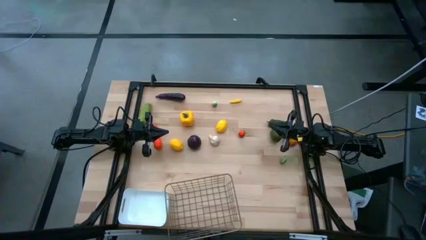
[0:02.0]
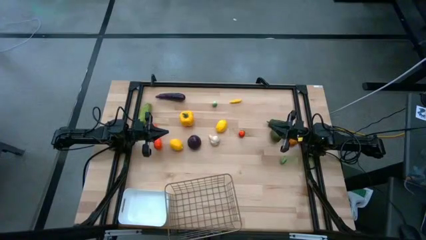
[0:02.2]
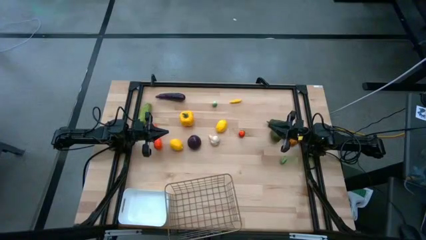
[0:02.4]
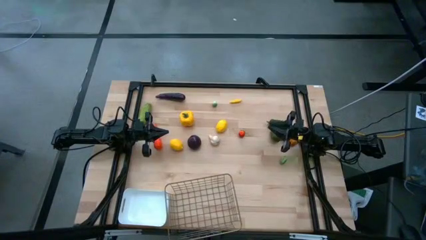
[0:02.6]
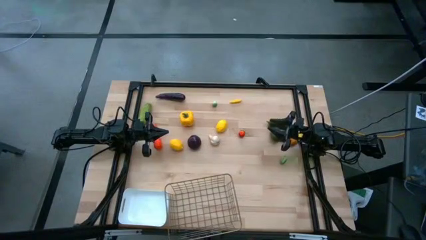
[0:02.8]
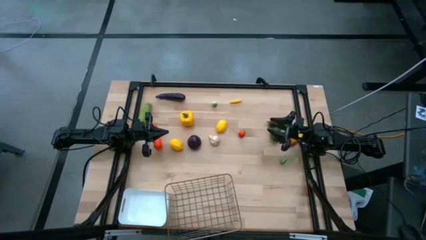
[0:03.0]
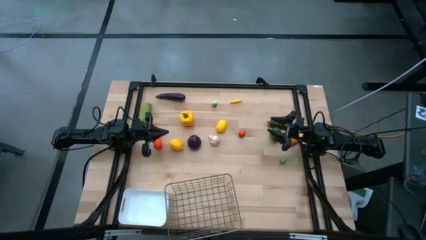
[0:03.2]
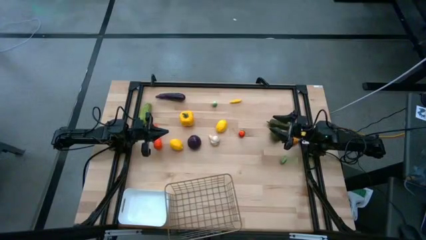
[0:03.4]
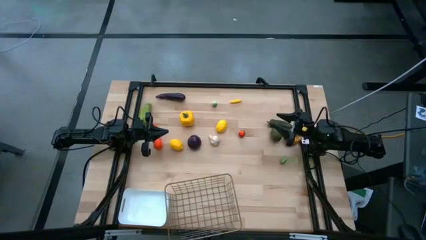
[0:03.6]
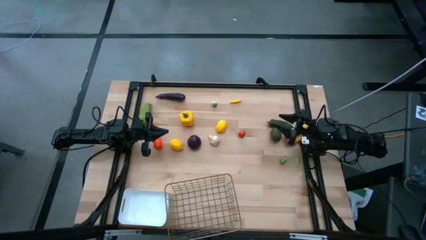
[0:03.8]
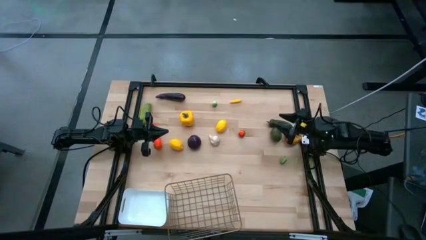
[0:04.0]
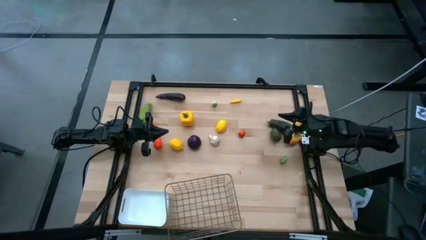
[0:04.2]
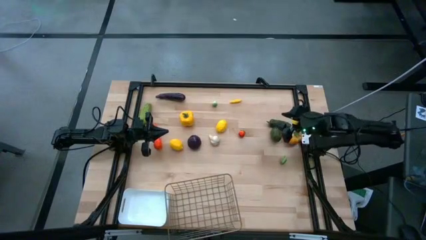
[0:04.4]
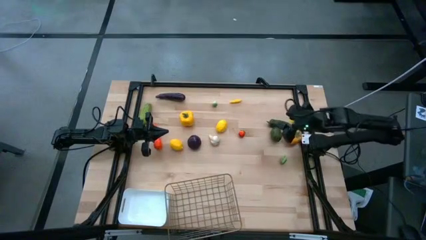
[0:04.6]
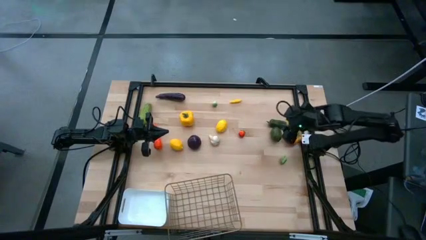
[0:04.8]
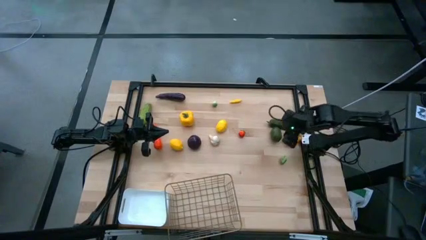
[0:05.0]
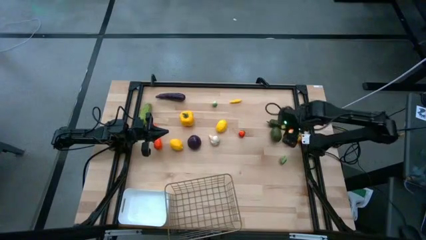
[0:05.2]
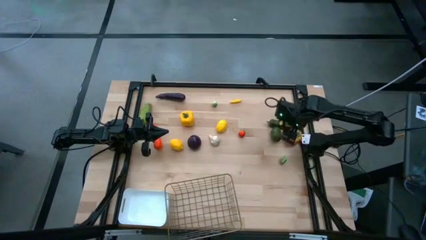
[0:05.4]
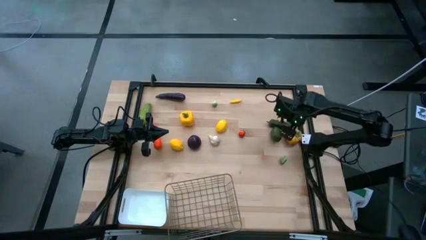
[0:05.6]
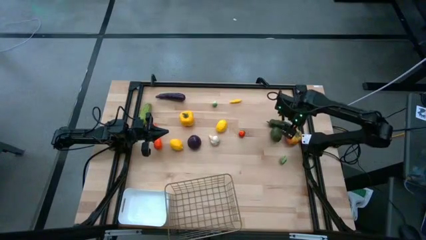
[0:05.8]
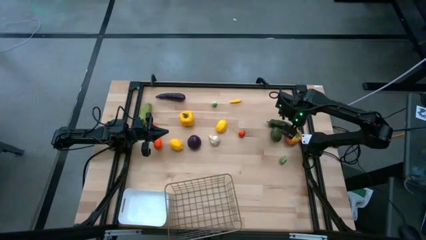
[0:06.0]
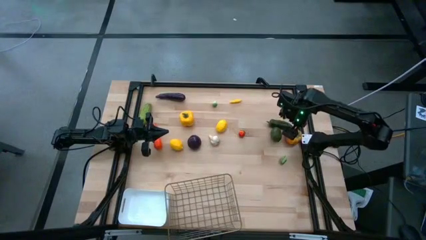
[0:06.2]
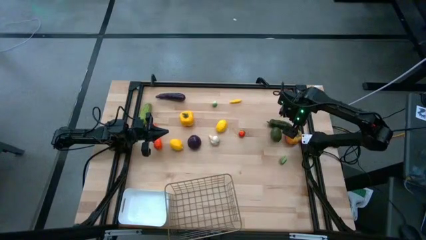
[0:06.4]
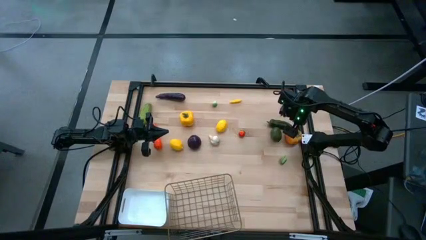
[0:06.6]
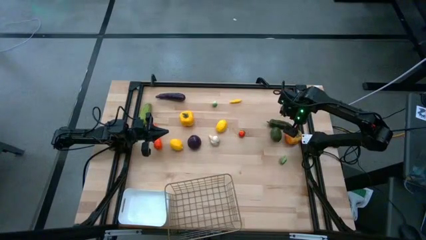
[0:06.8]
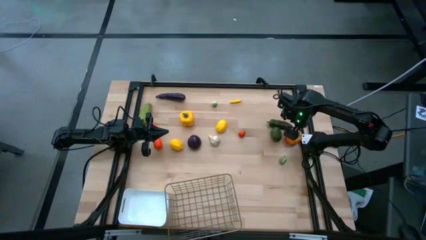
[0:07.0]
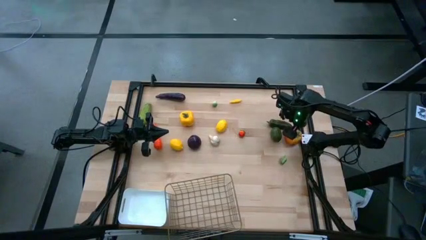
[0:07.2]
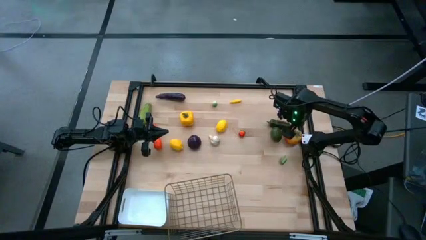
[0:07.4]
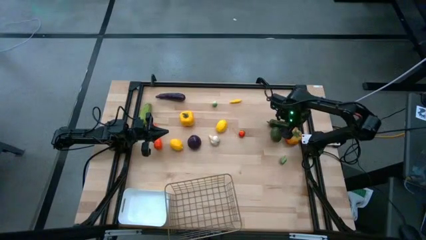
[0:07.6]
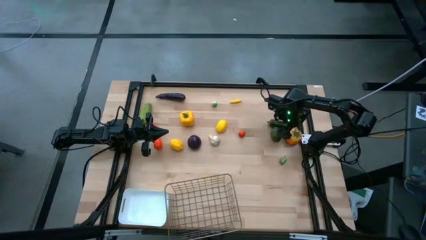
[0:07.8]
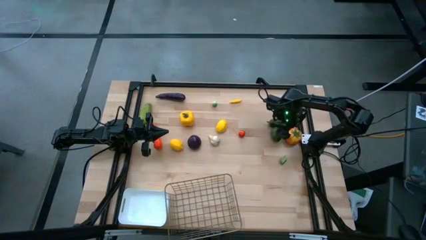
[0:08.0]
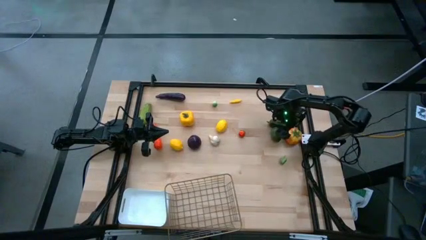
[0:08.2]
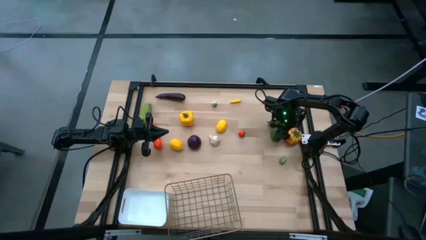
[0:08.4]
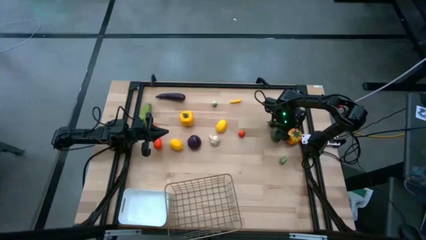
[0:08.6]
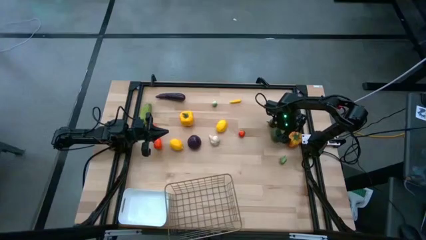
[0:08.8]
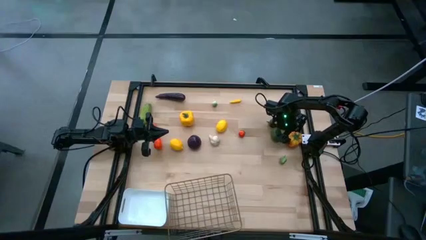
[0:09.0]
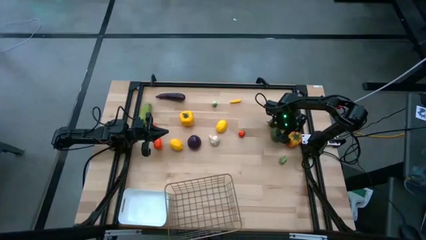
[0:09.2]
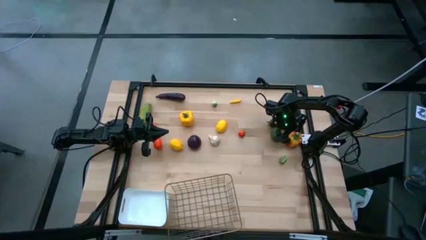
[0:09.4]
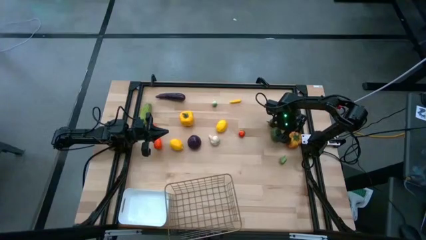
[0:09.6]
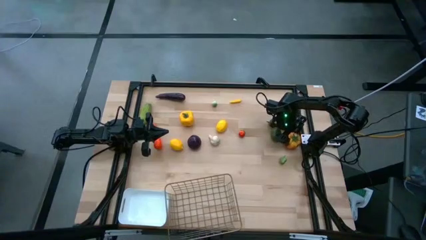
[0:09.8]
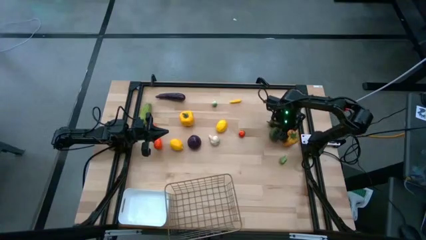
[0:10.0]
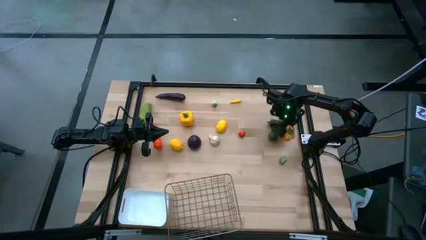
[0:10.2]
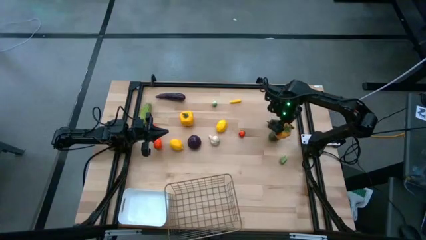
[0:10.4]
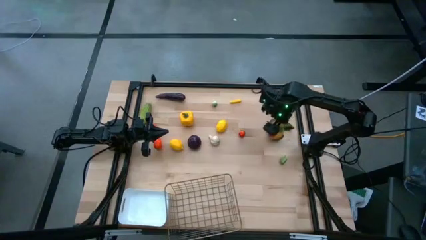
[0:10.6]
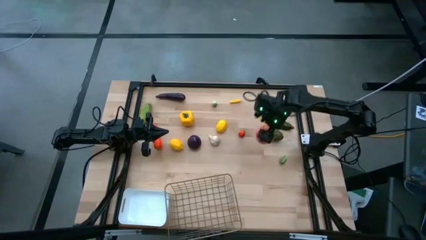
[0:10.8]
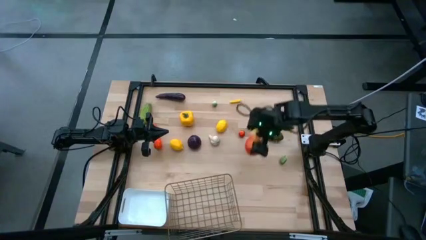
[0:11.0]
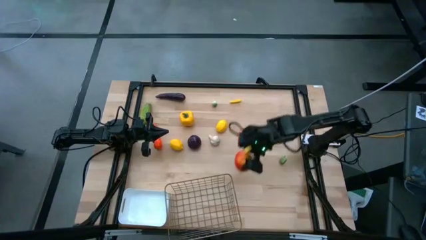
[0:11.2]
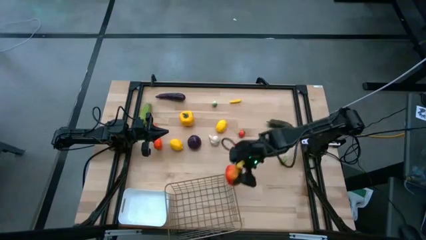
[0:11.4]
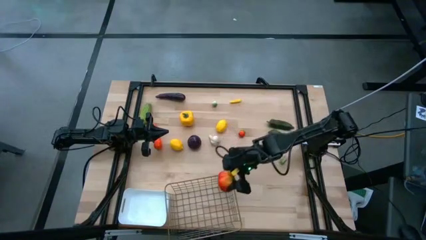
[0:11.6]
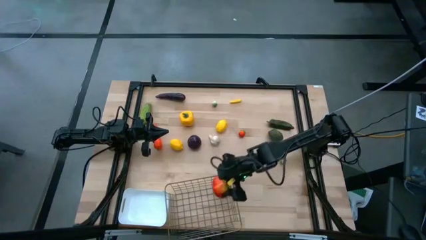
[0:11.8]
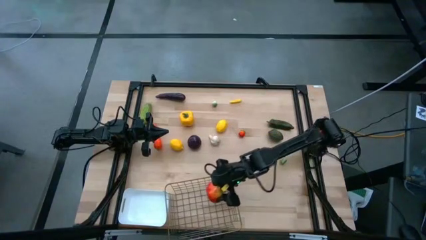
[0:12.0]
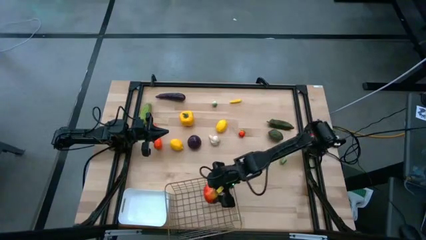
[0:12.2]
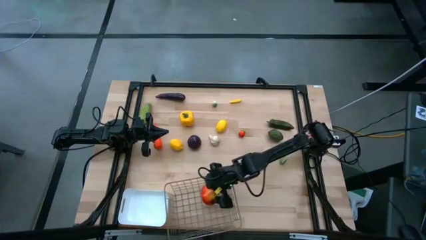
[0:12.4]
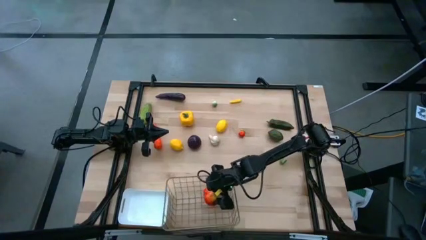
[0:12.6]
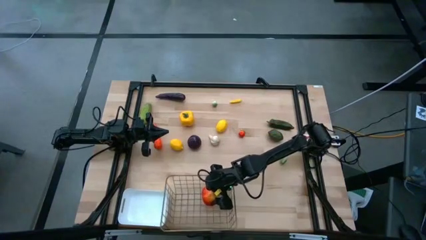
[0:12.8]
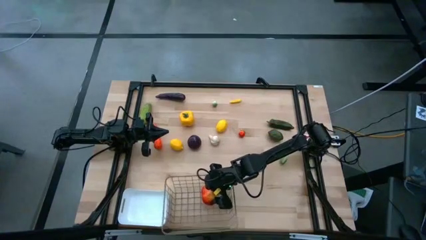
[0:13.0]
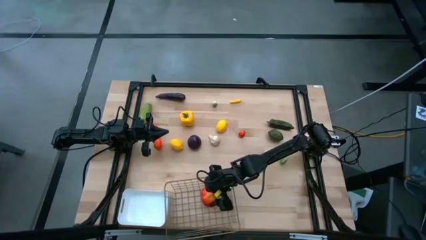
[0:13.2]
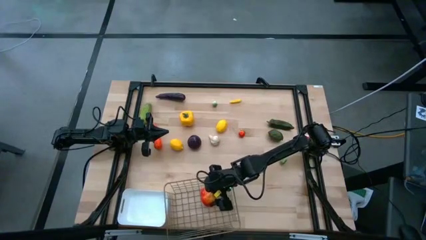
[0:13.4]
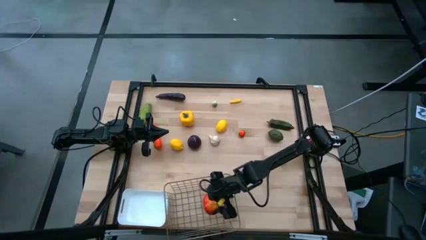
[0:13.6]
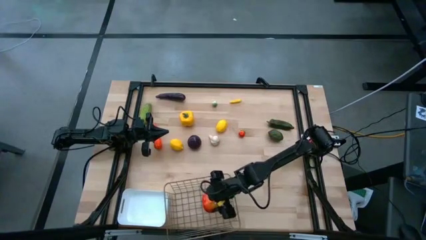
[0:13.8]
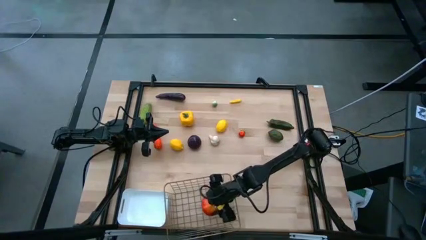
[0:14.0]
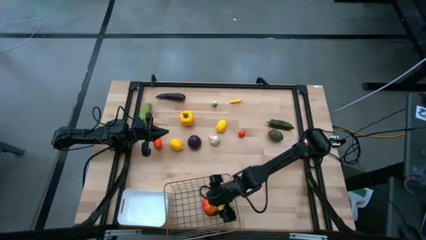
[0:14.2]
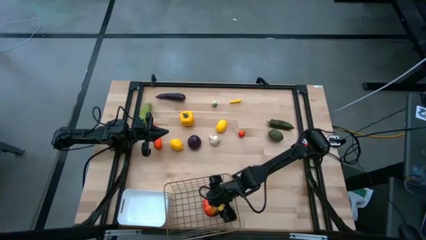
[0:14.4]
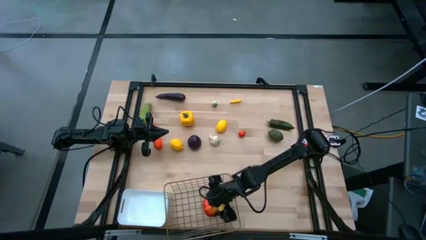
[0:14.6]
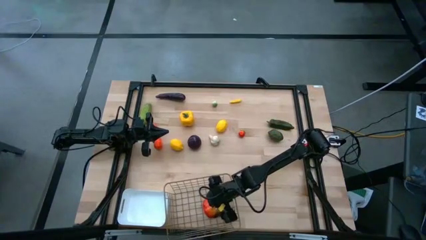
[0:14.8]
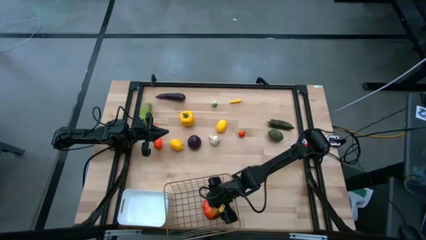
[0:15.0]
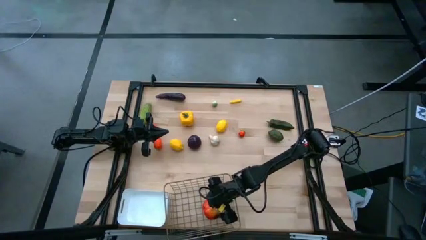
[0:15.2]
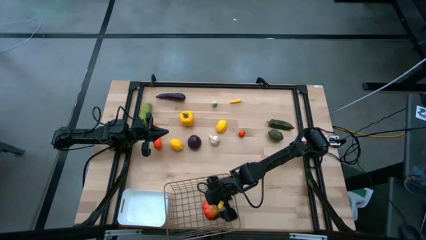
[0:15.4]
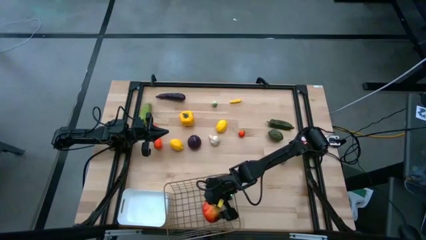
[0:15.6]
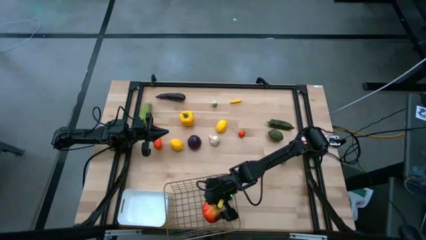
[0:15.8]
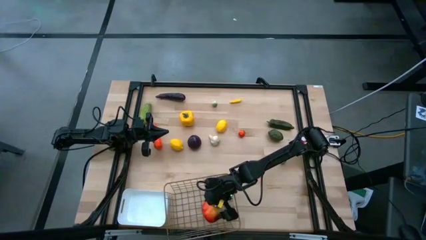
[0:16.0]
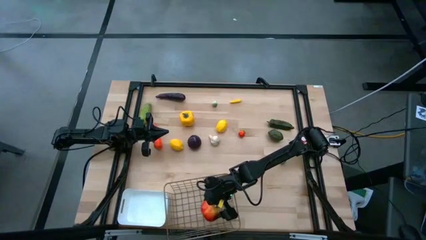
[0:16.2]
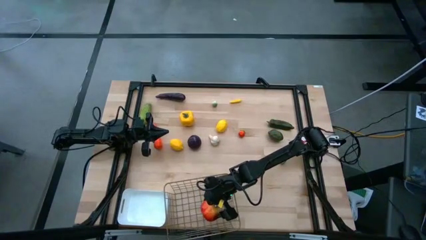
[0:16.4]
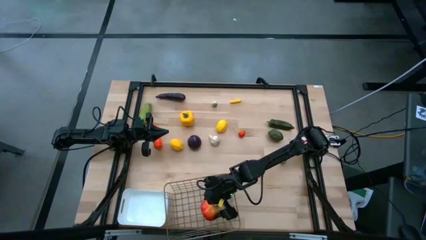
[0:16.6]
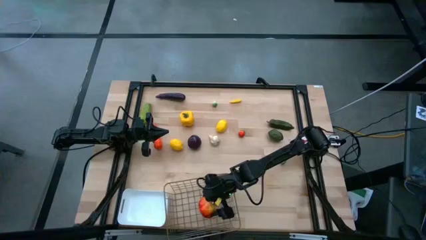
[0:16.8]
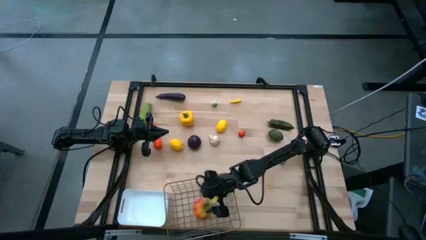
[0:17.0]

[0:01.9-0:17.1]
Task: Sort produce into baskets
Put the light orange tomato into the wire basket
